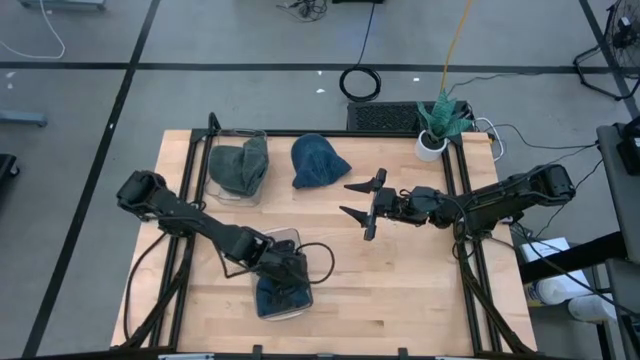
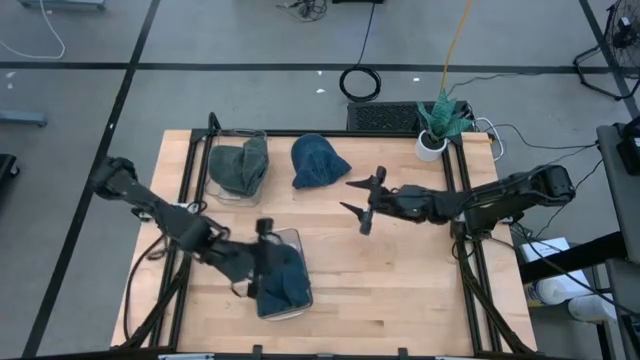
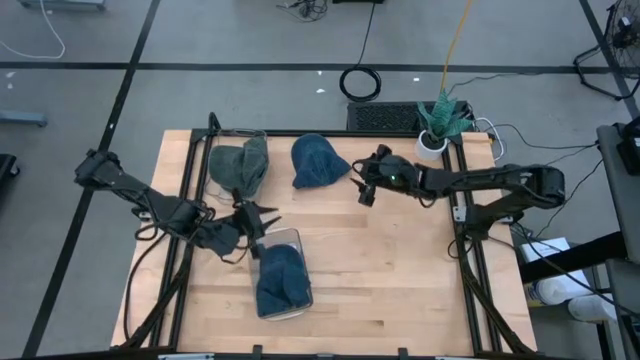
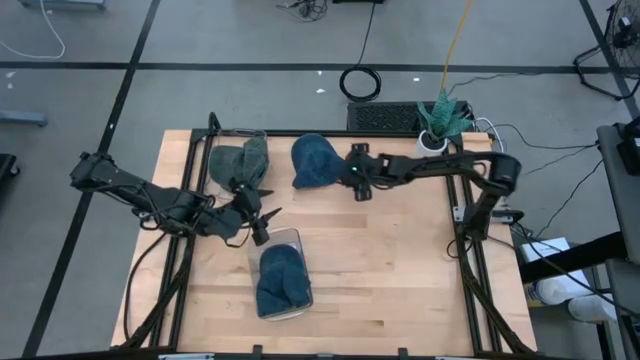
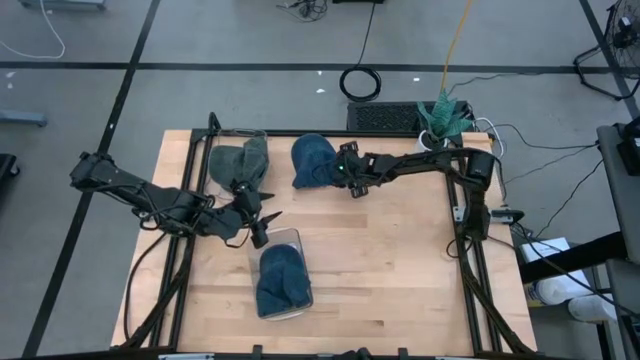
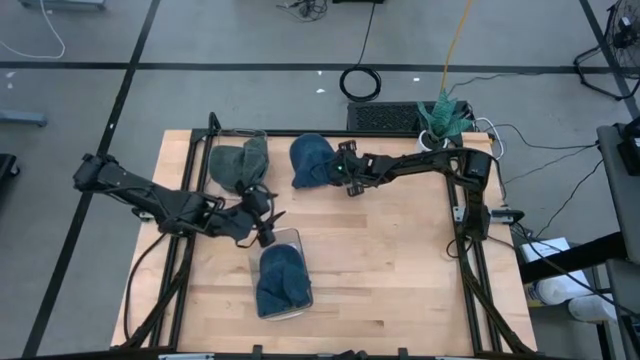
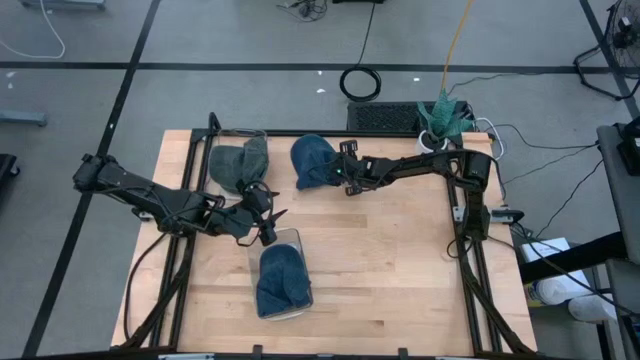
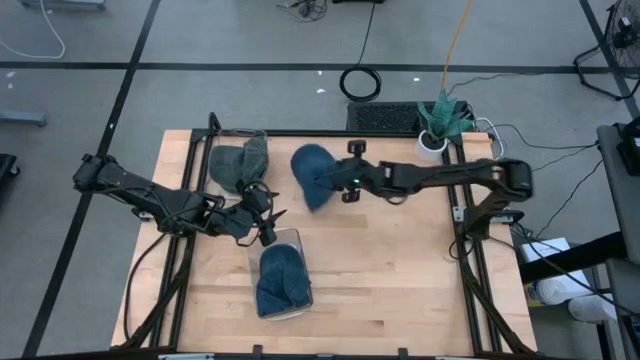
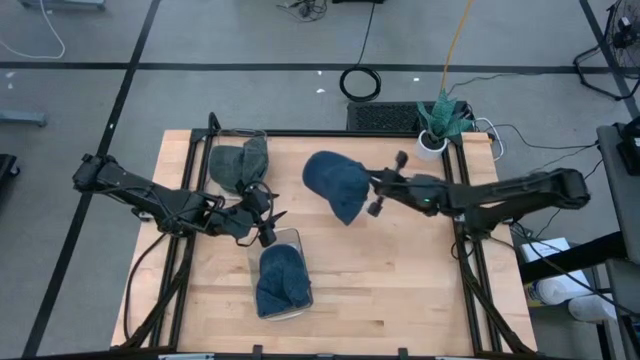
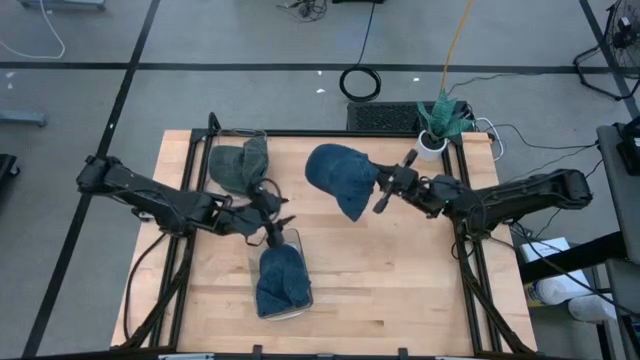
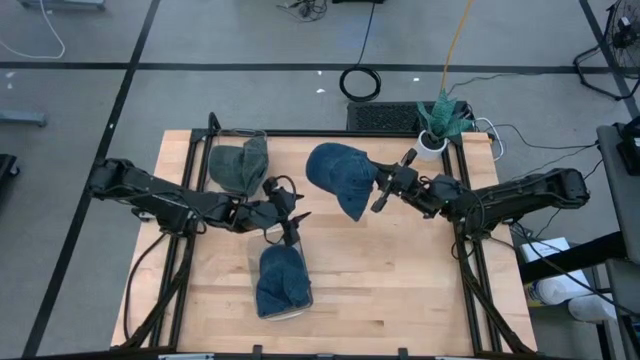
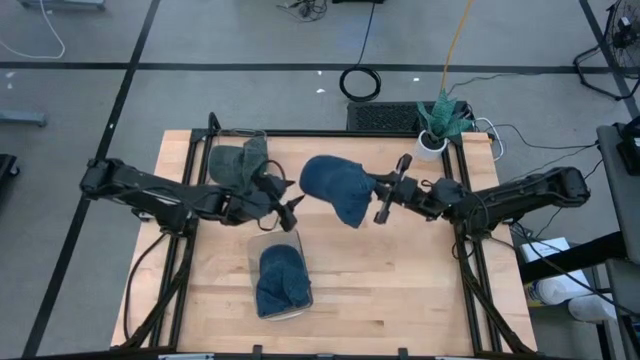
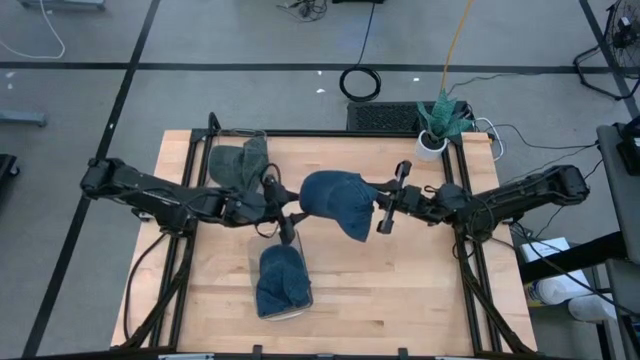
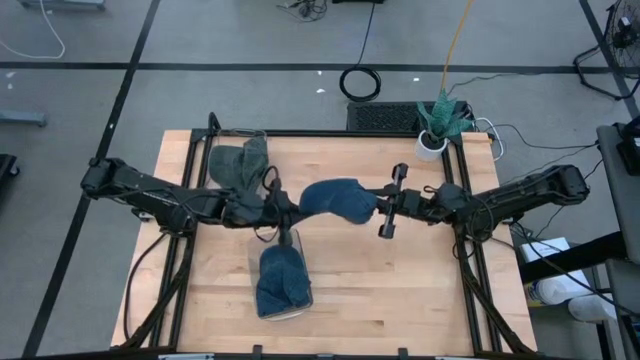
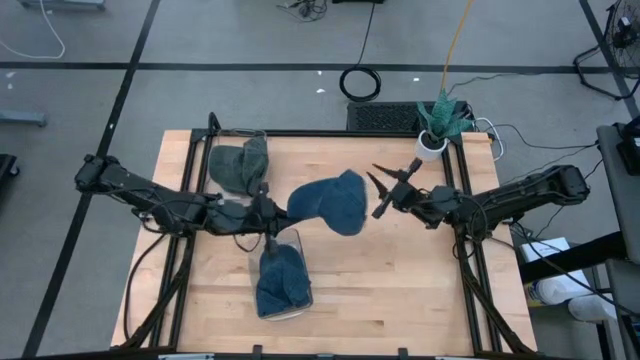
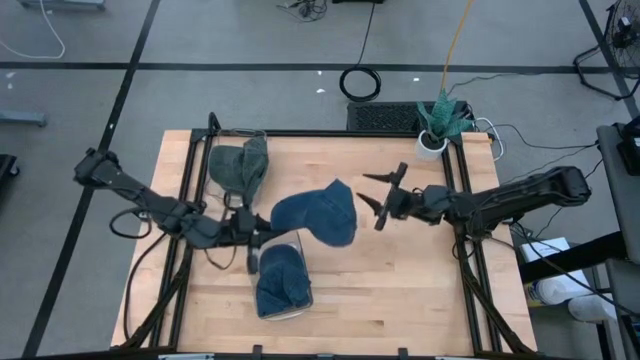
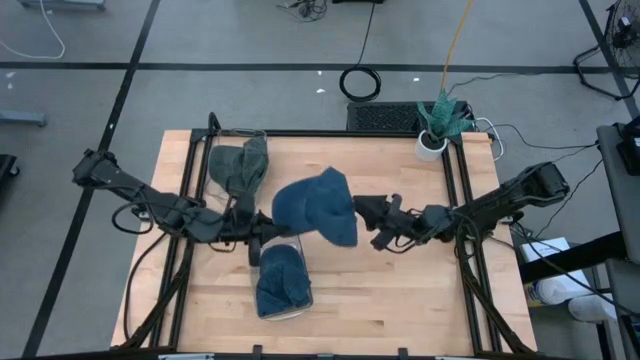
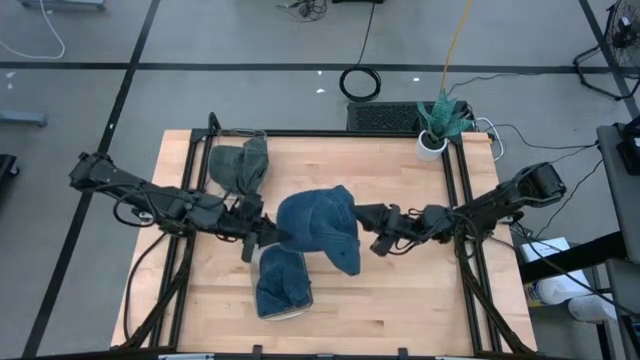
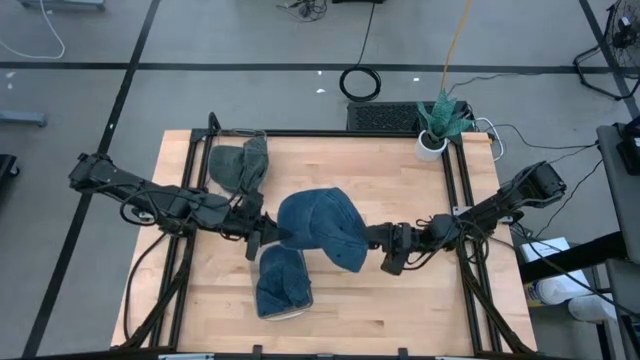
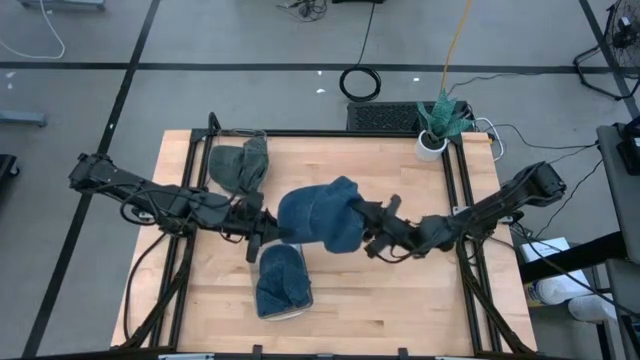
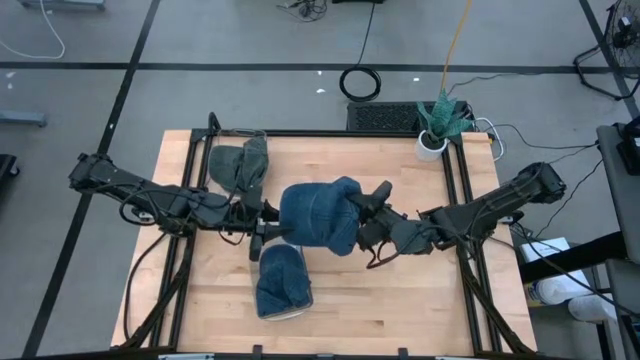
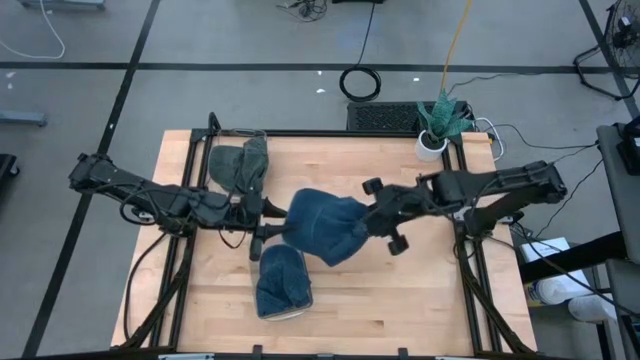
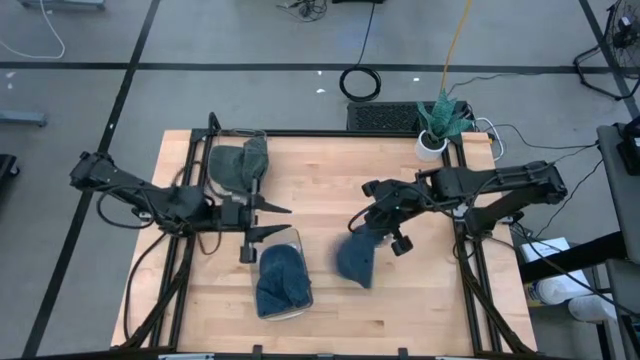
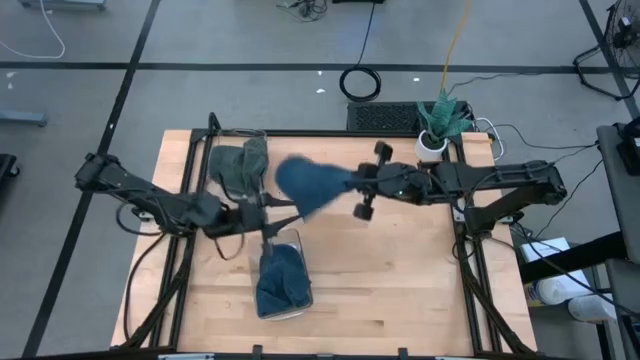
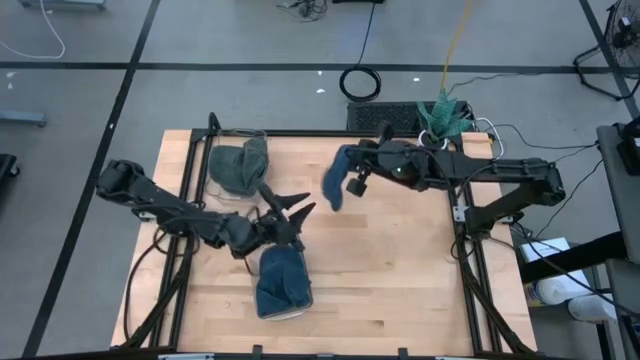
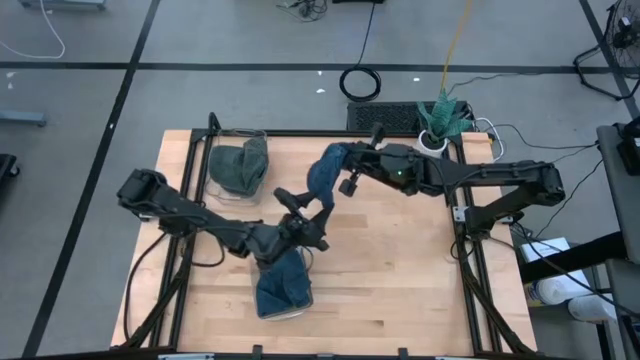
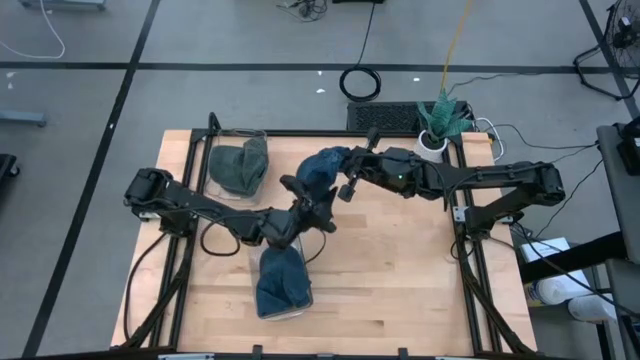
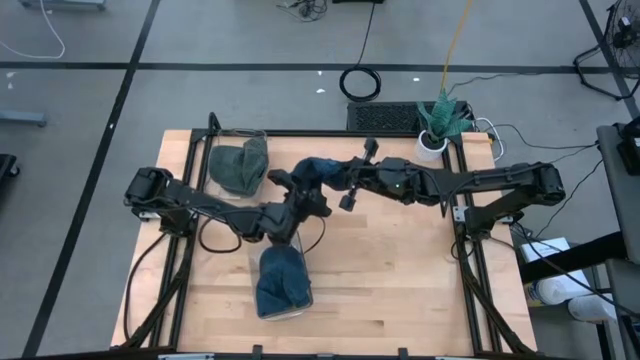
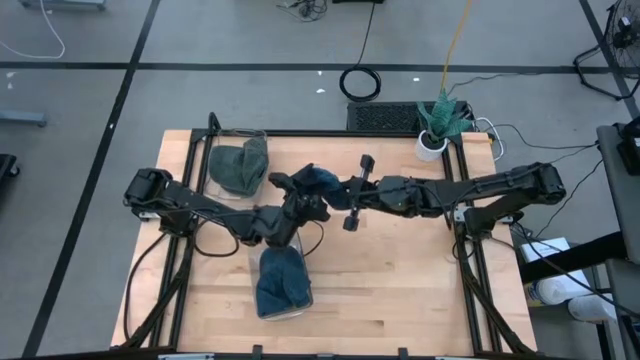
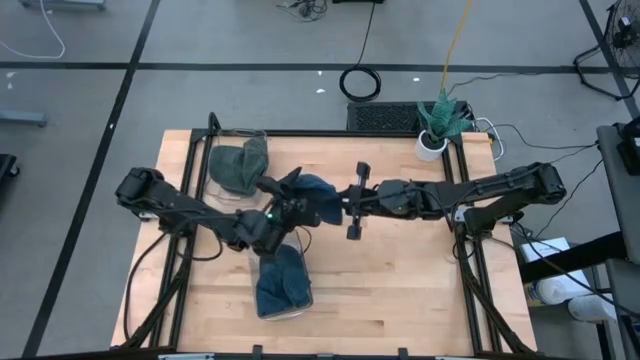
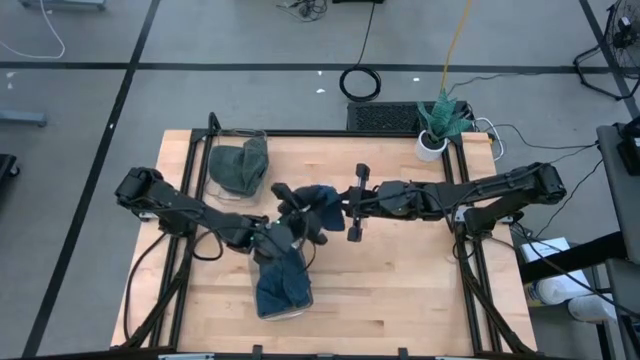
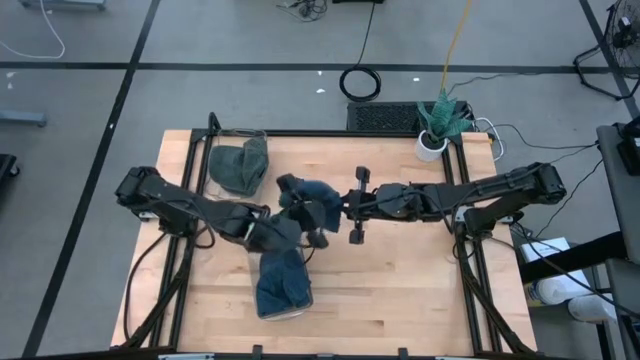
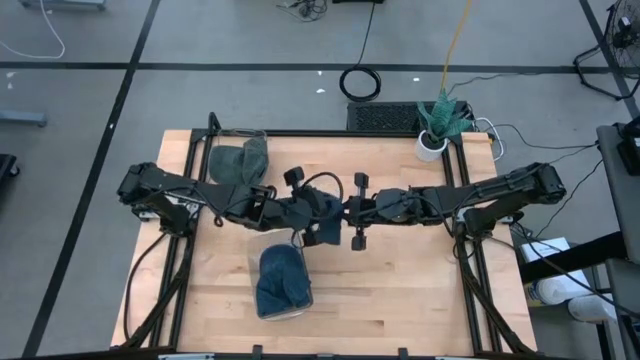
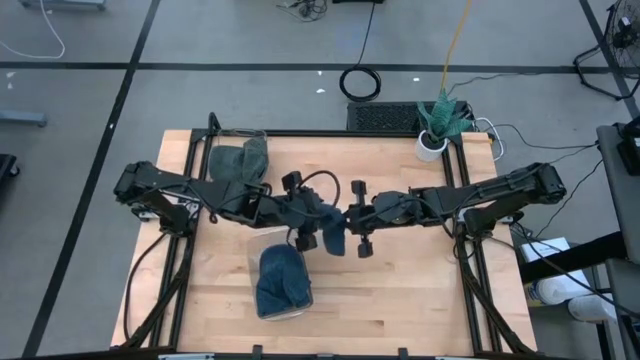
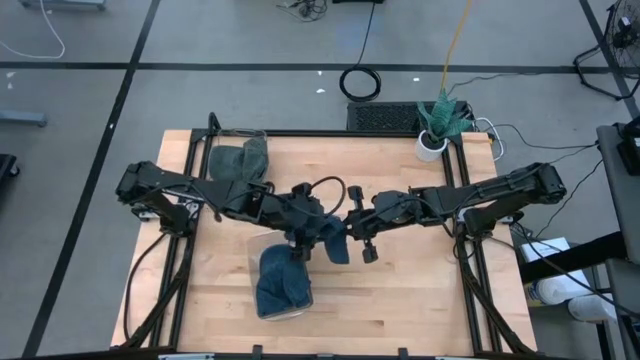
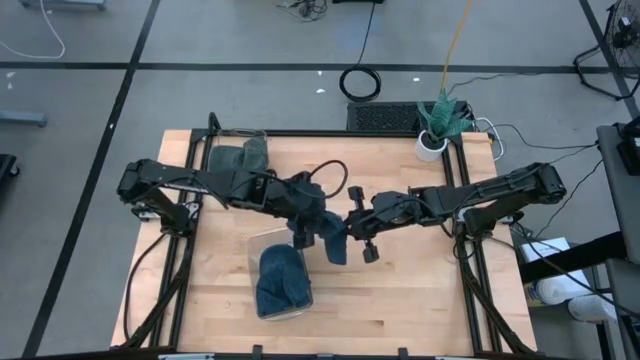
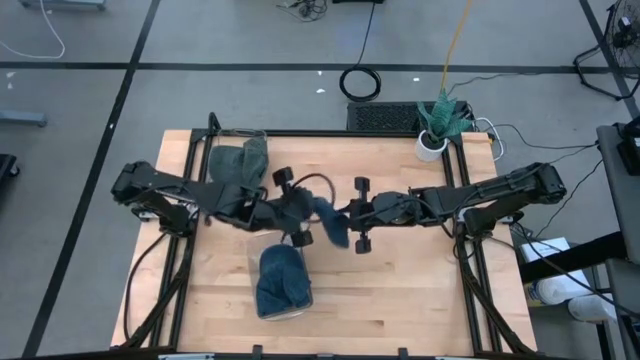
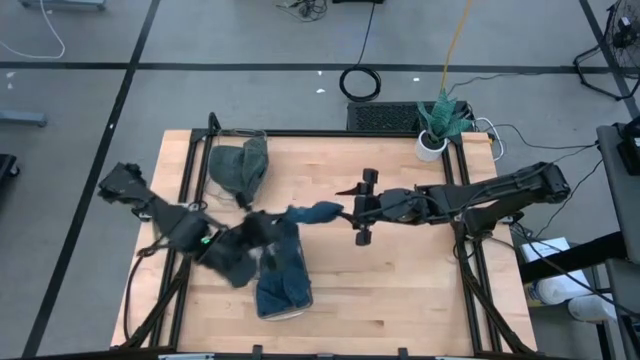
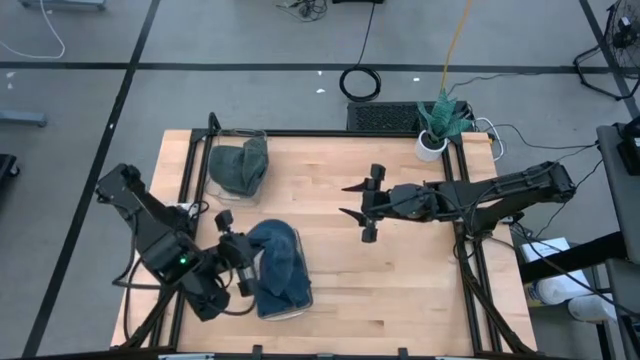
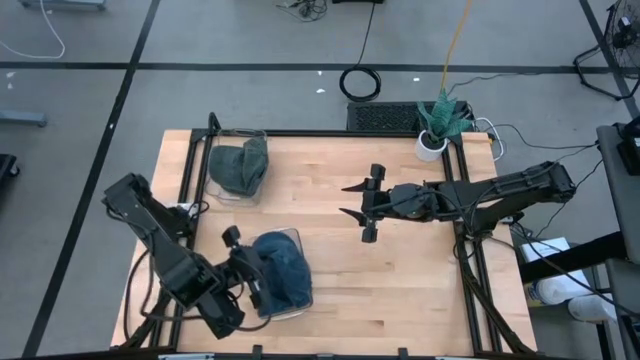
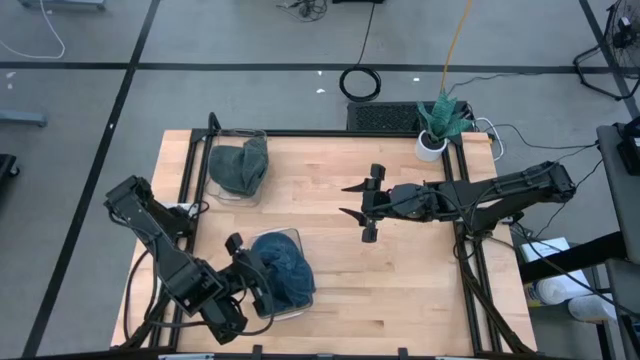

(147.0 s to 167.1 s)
Task: Pick & Place hat
Put the blue cap into the bottom transparent bin

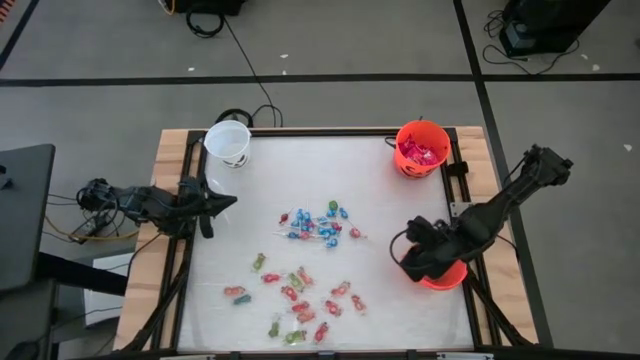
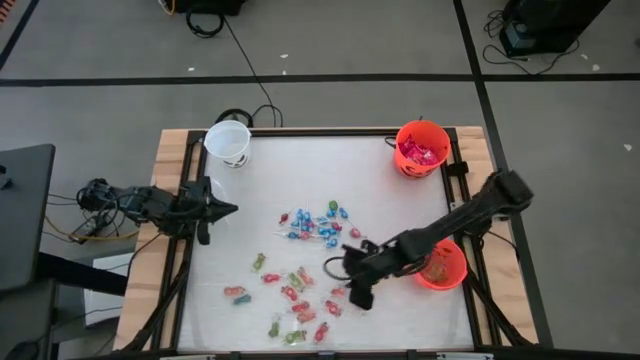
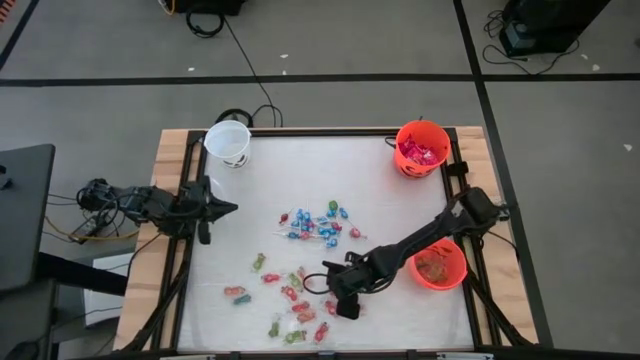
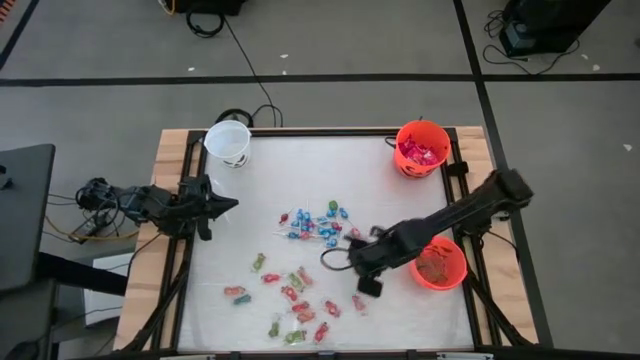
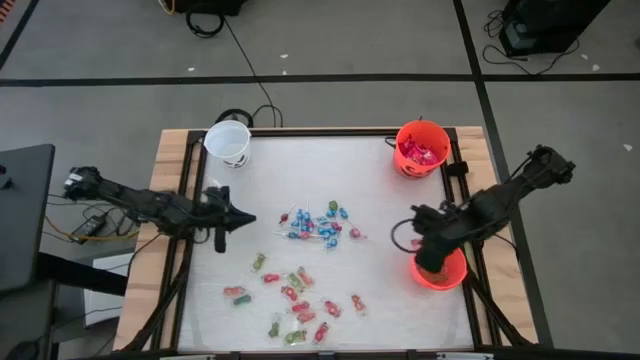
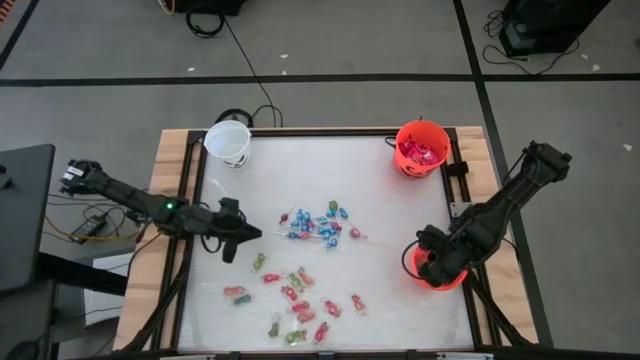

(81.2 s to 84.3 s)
Task: Sort candy by brand, put in halloween buckets
Put the orange gummy into the bottom orange bucket
